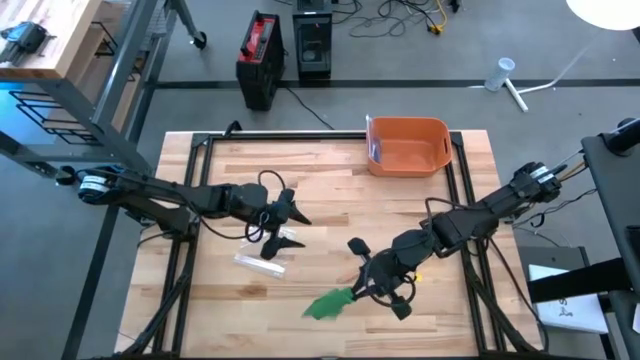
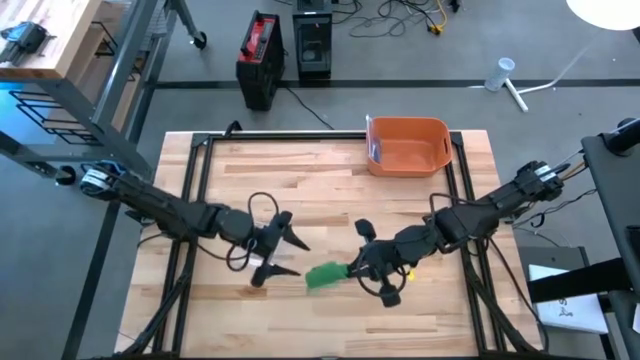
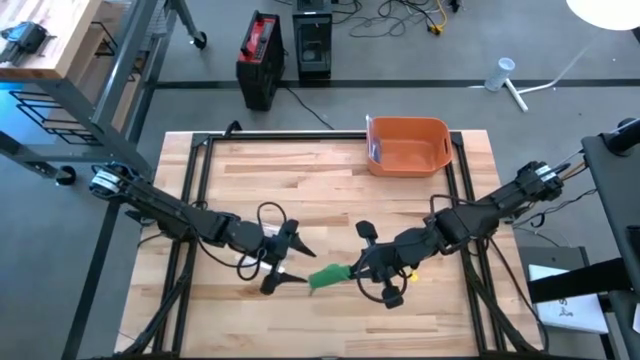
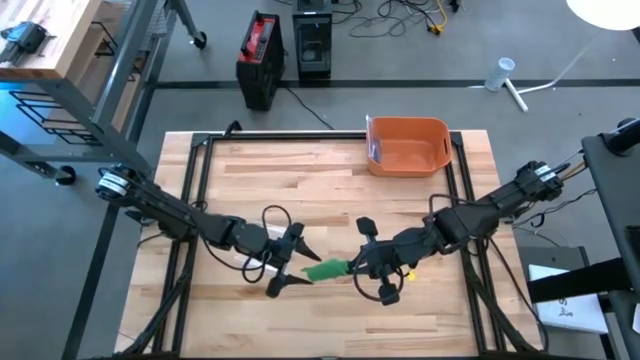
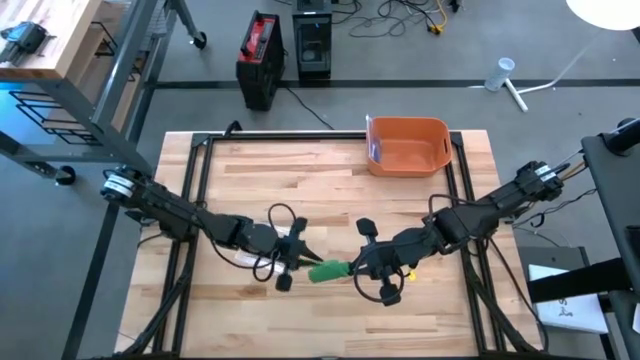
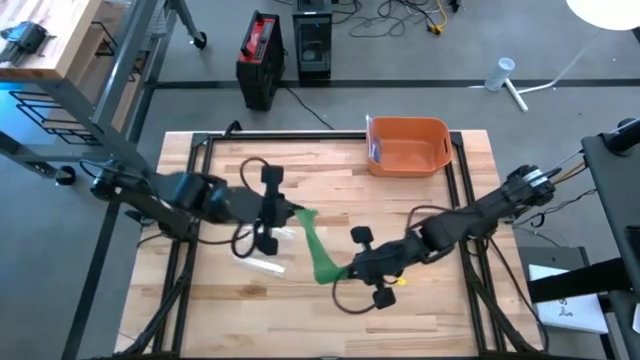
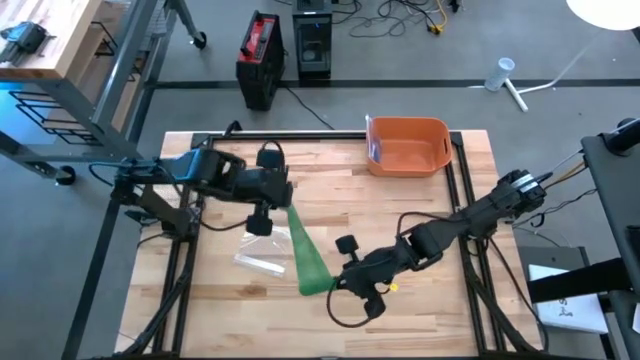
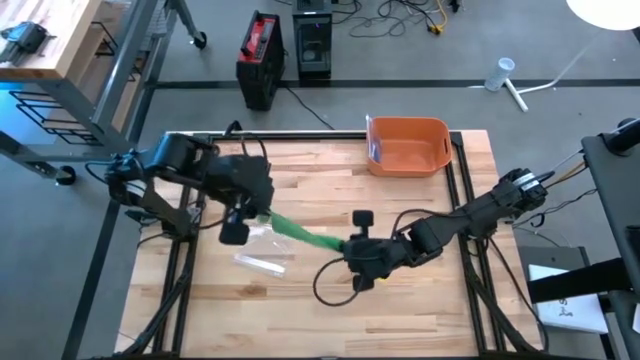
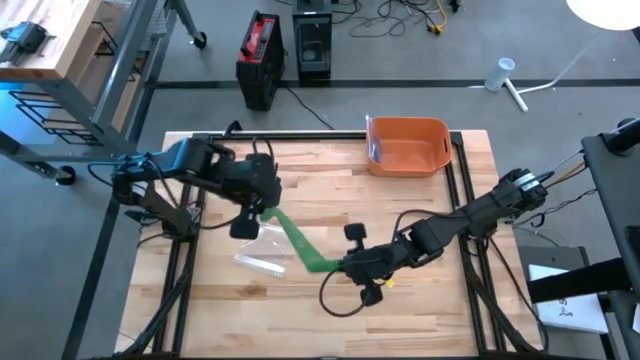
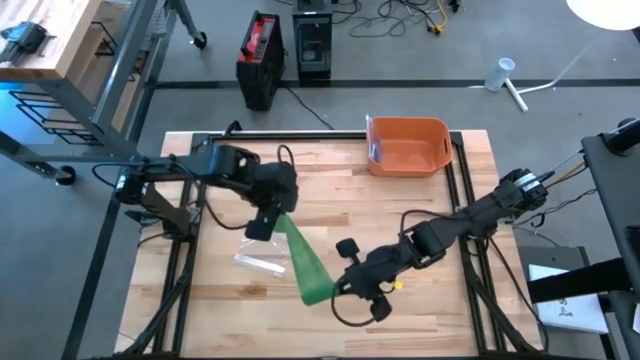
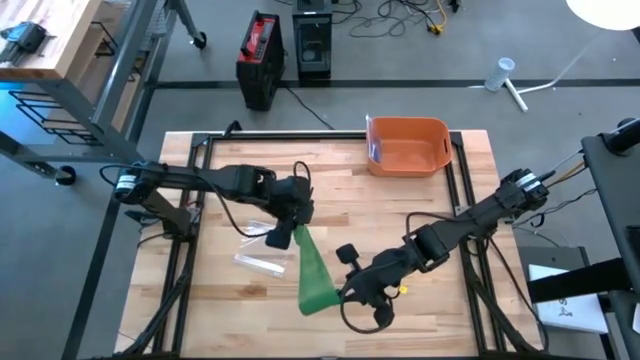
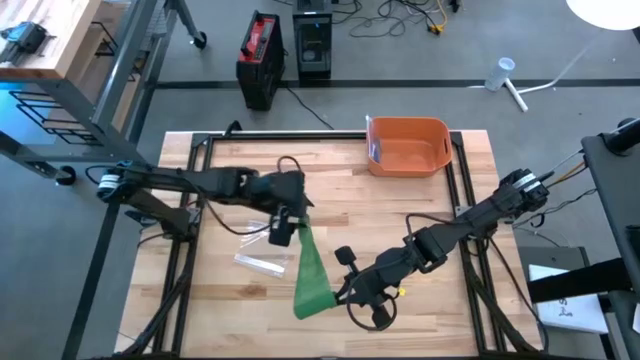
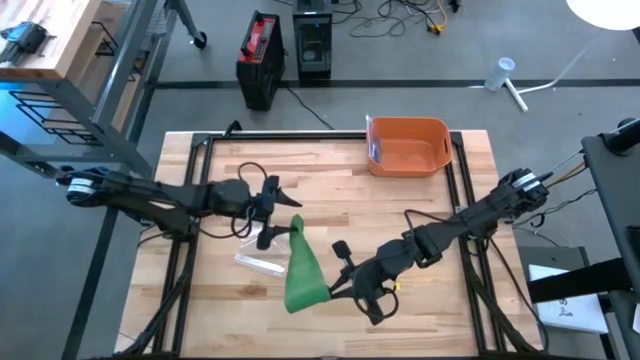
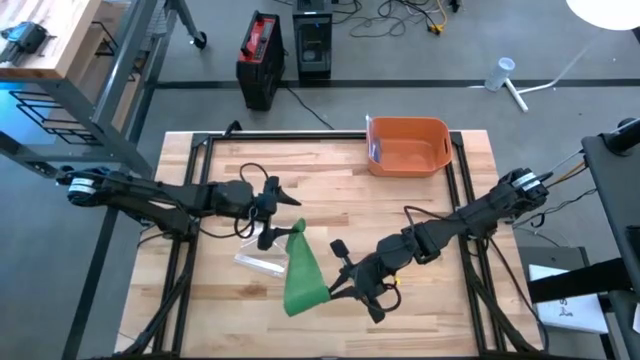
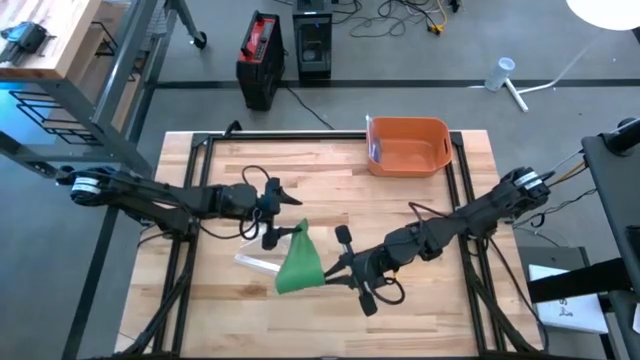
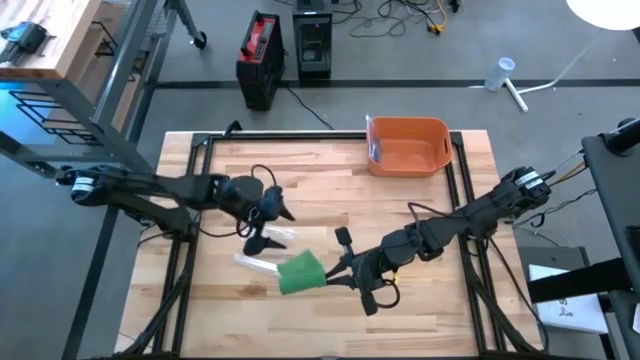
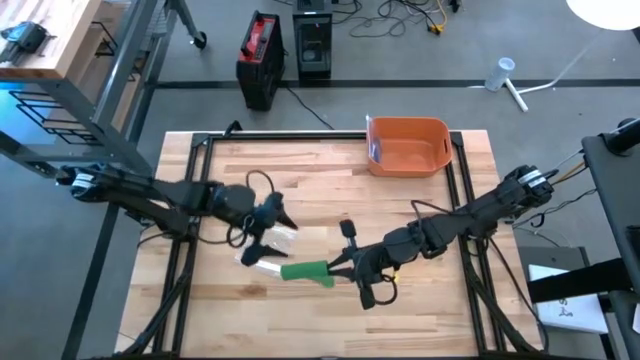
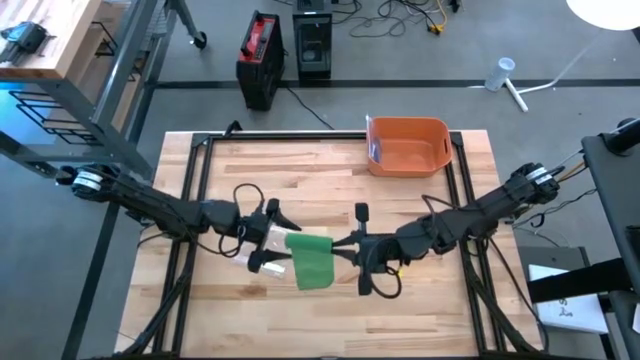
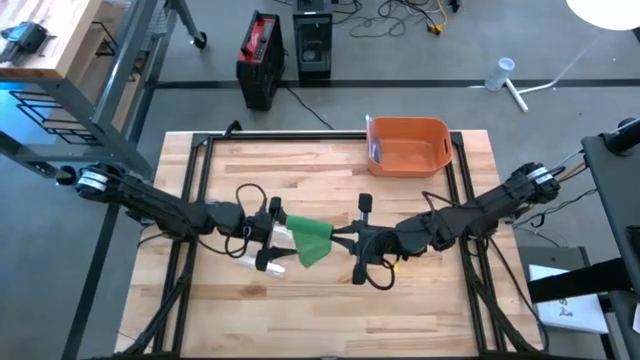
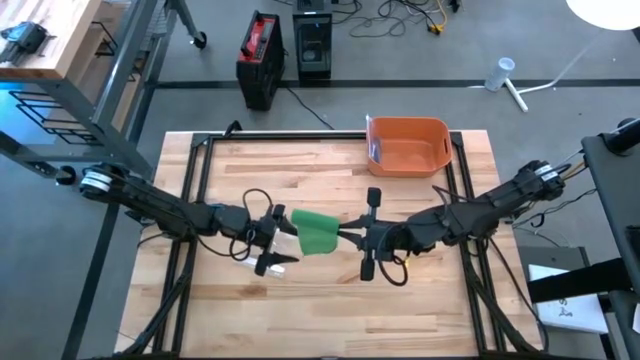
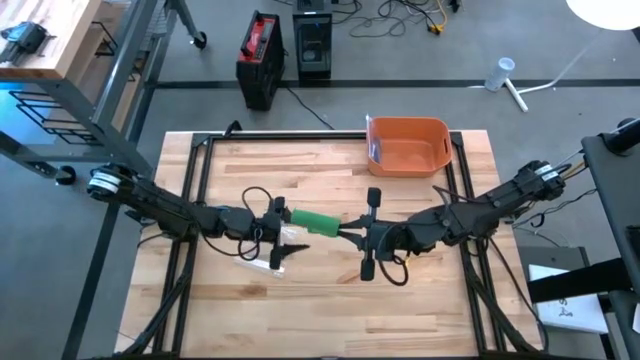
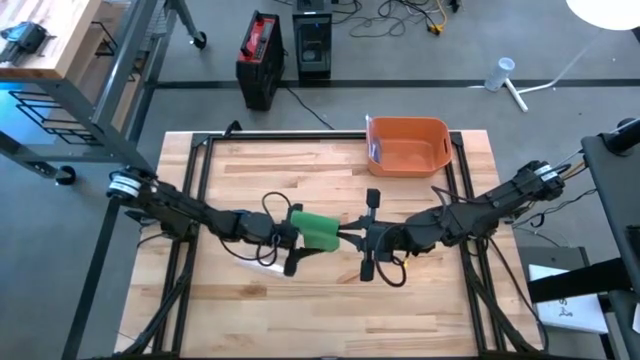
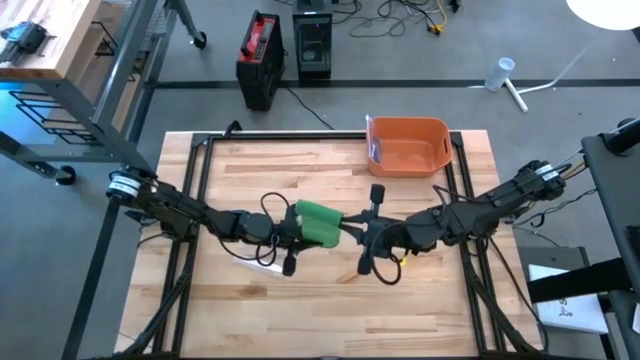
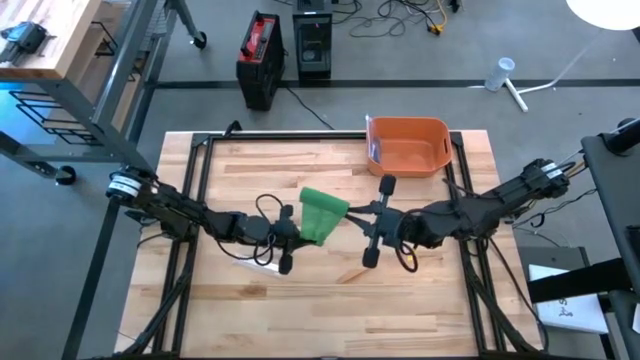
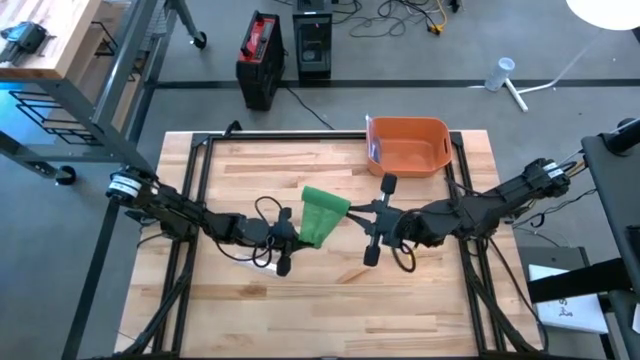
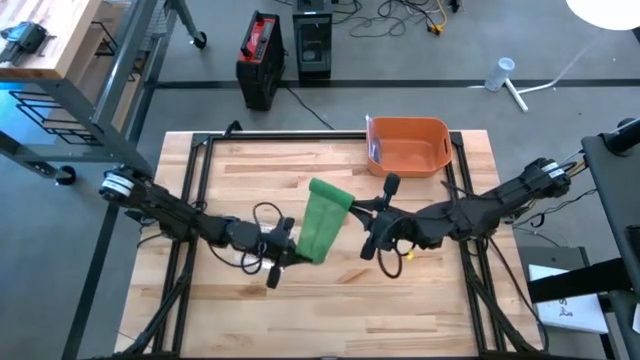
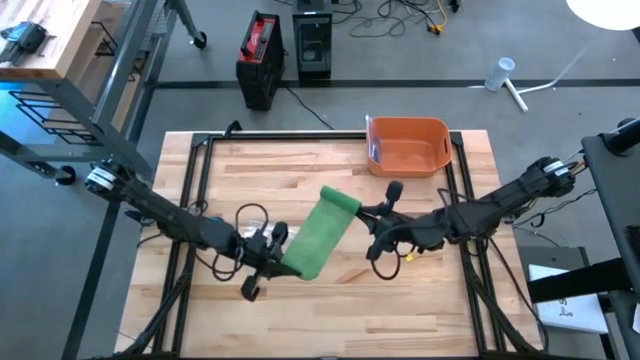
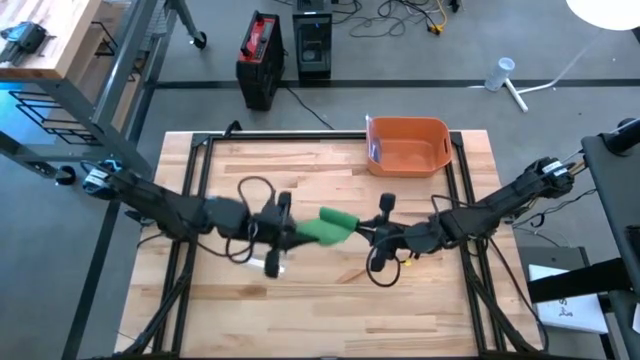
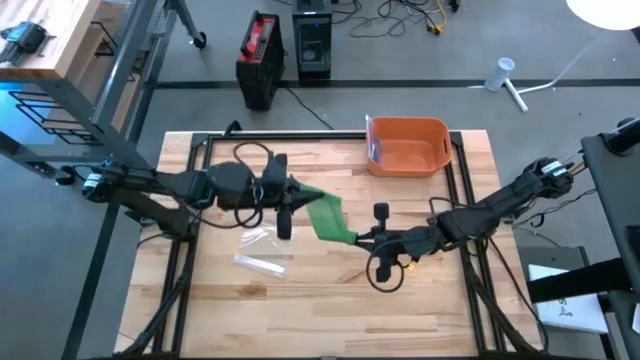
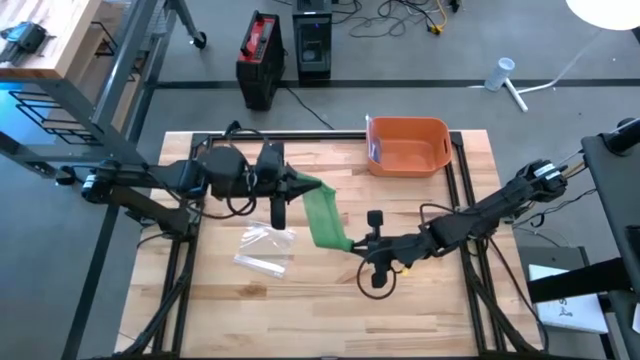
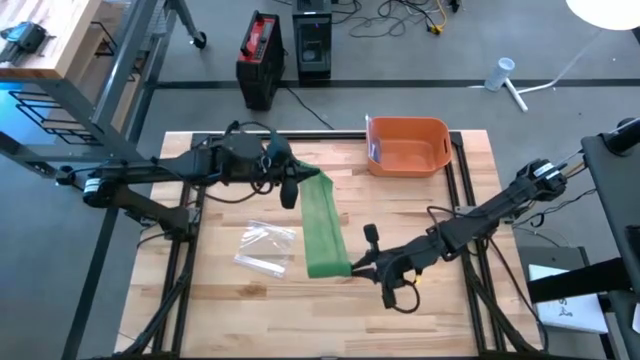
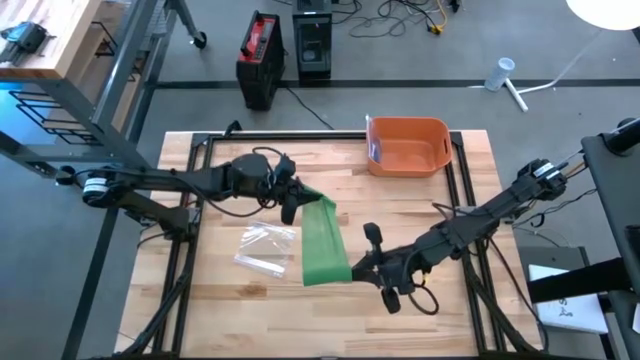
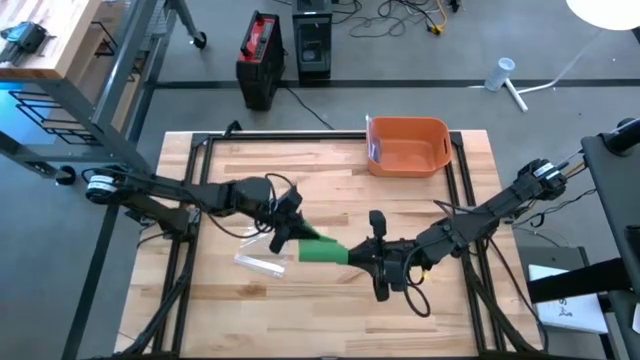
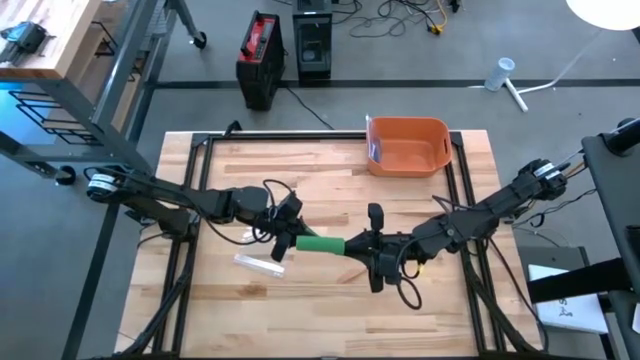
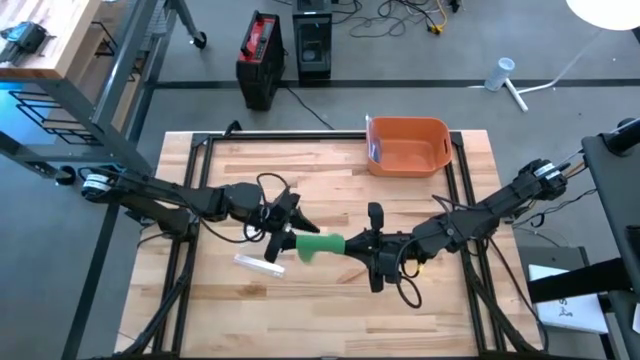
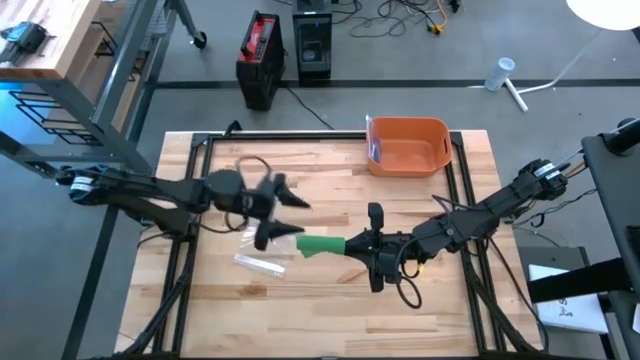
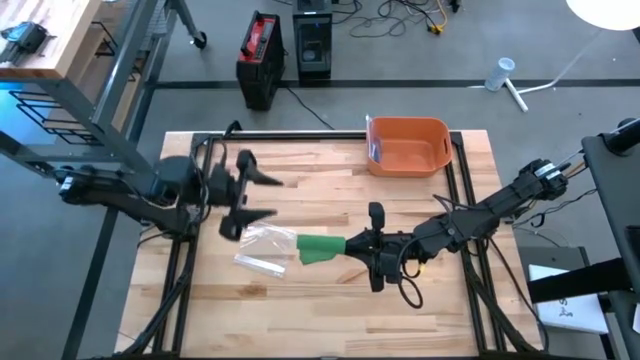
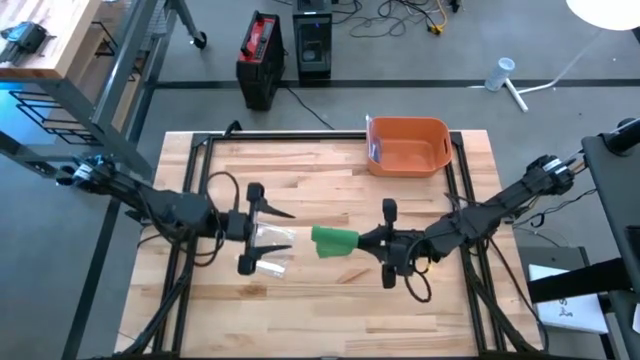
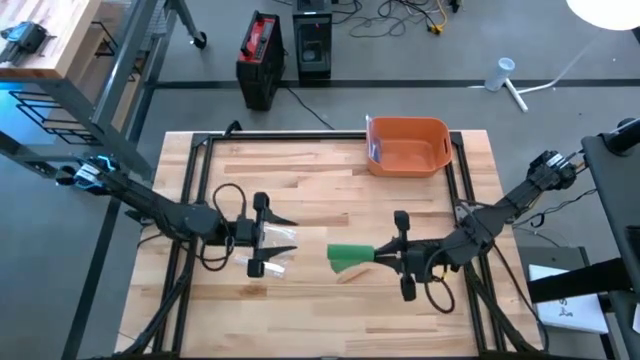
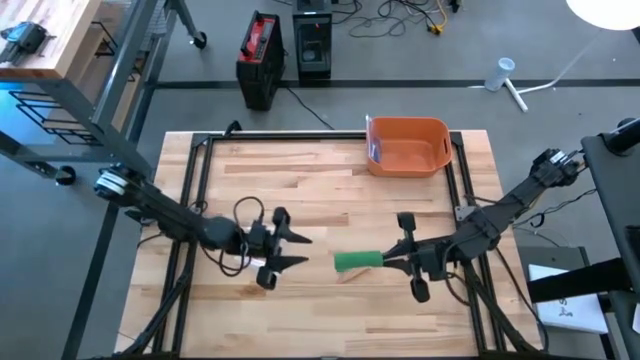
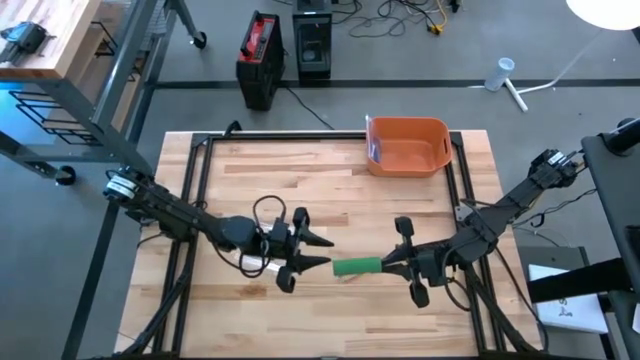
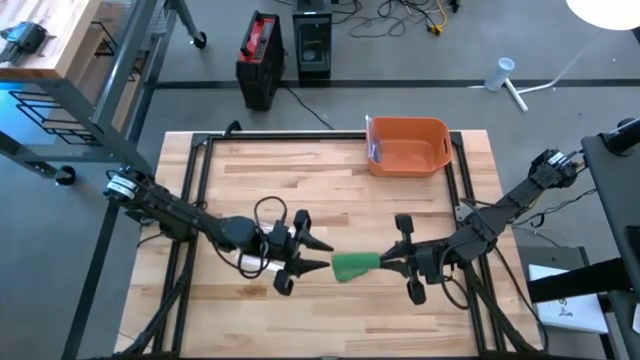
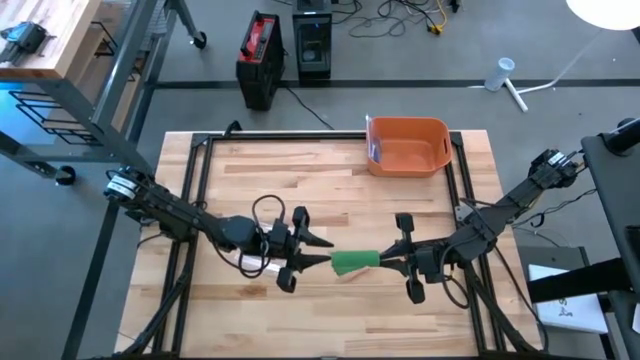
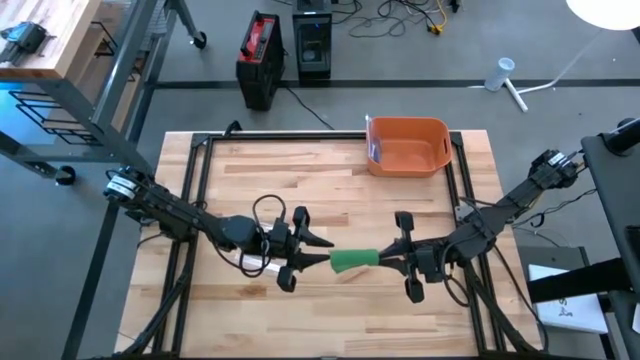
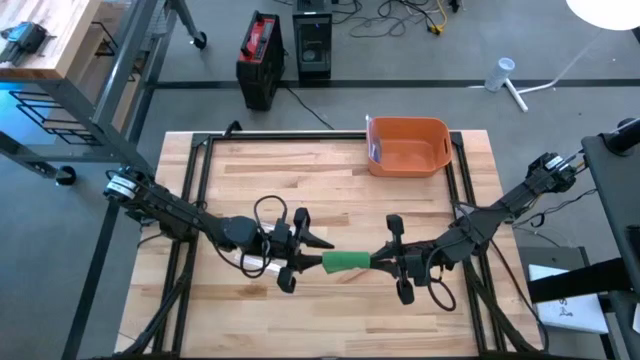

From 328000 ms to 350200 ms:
Task: Roll bandage
Roll the green bandage
